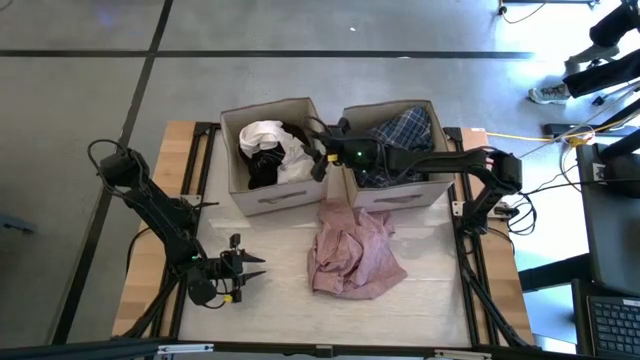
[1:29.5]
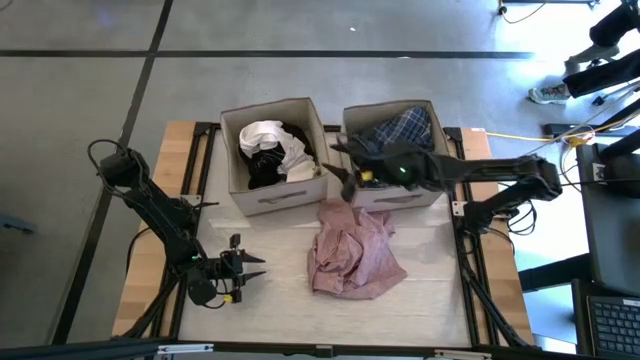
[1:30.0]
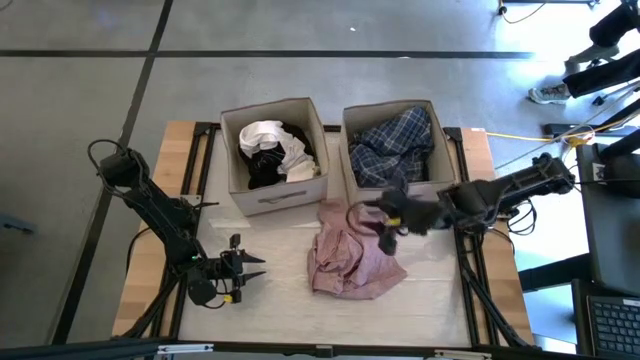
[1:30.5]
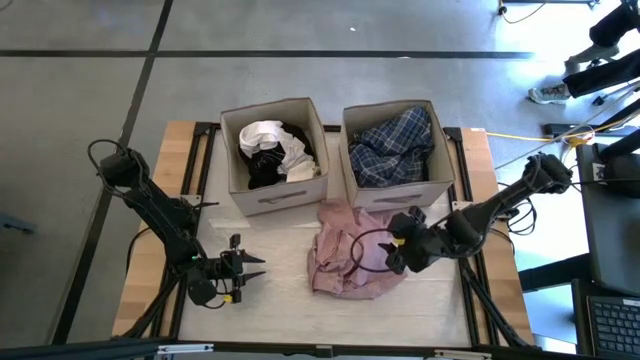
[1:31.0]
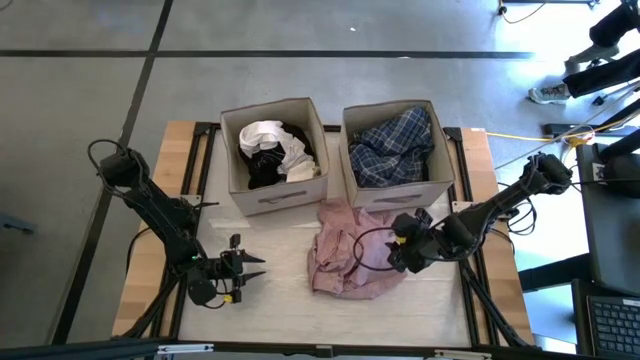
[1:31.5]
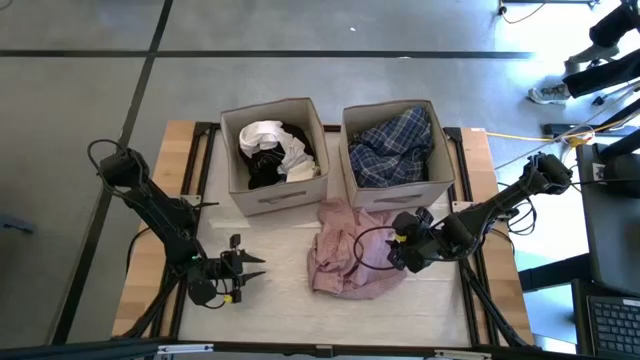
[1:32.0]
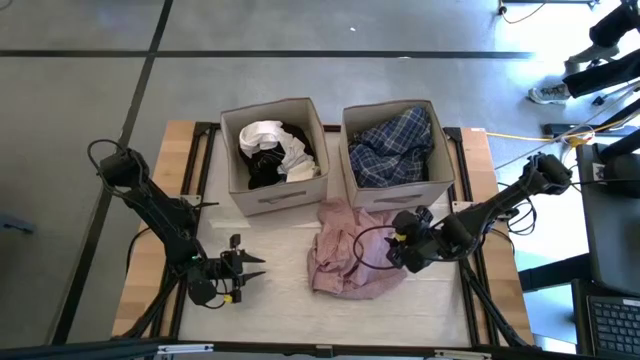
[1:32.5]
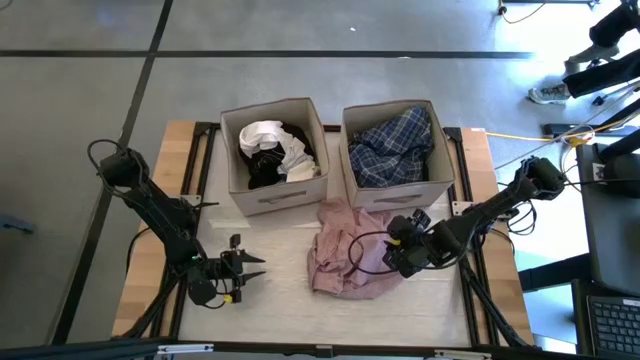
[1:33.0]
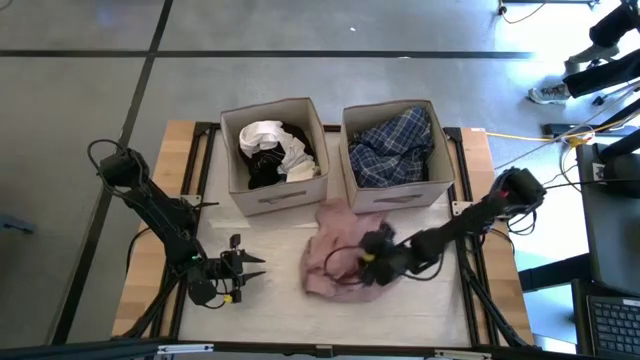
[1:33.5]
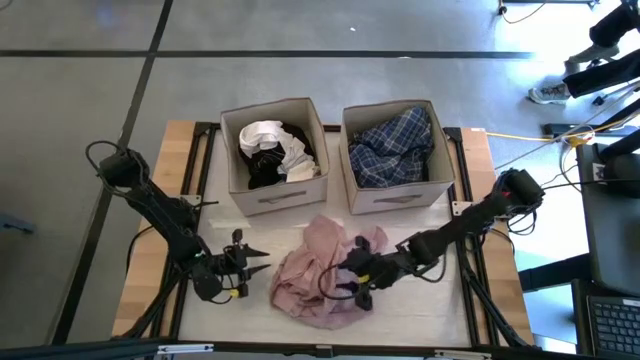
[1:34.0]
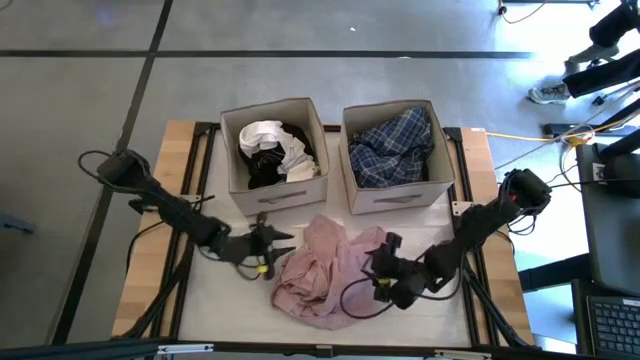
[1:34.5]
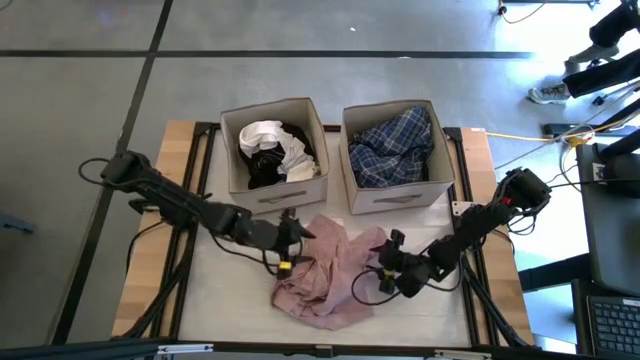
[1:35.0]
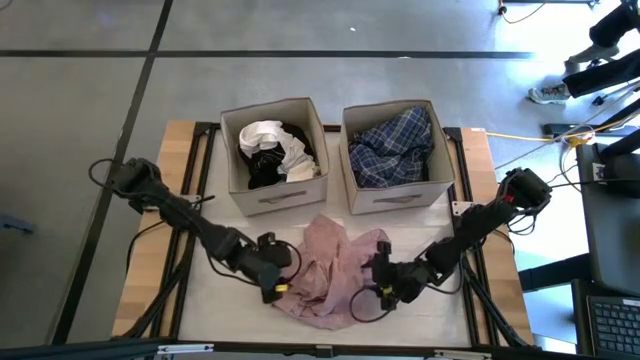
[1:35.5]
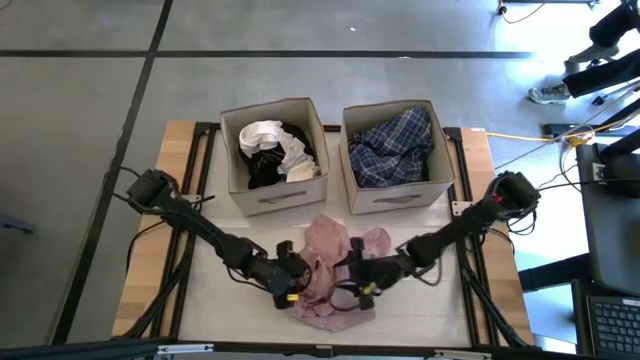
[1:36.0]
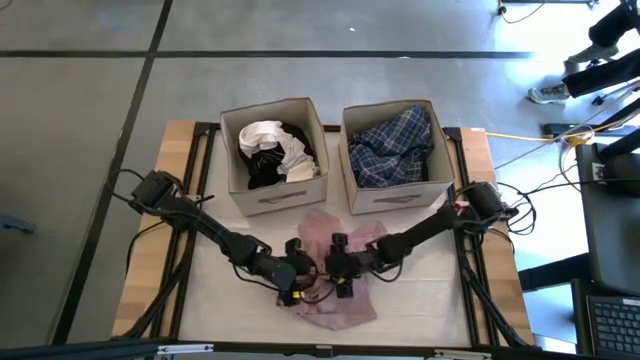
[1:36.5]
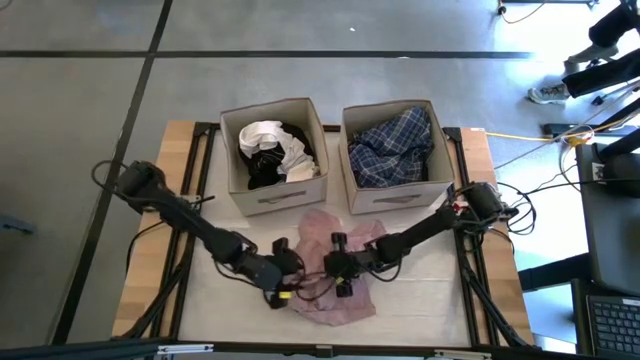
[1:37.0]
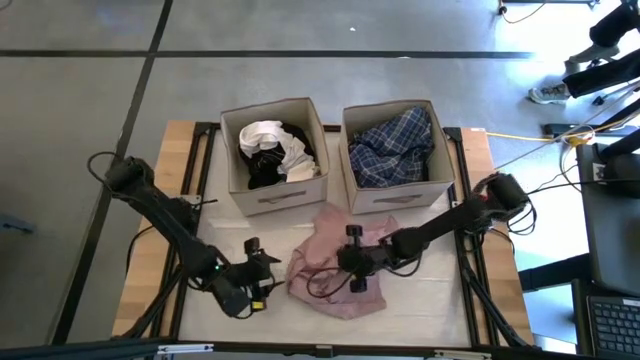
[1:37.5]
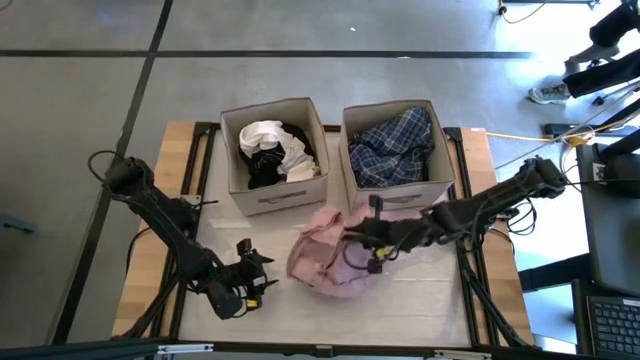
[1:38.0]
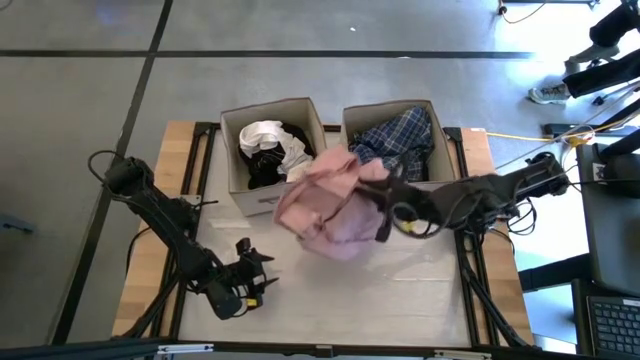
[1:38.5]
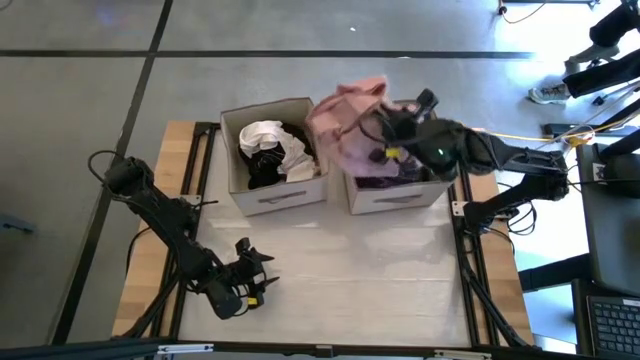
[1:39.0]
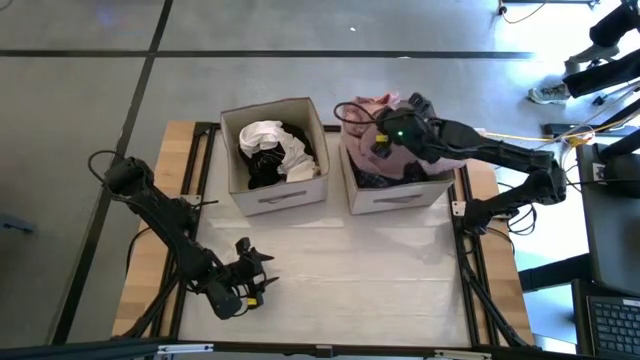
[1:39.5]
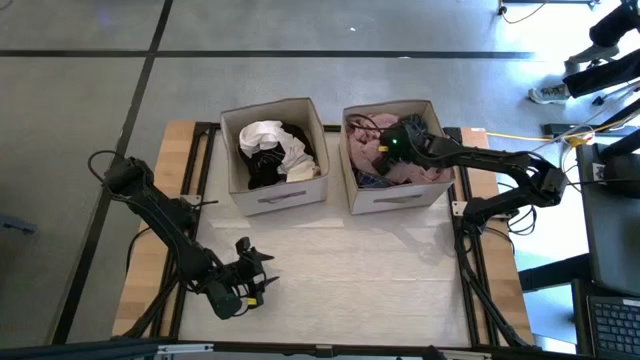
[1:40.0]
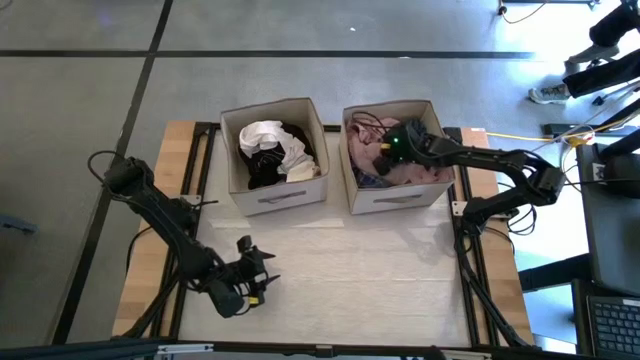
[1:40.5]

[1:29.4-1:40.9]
Task: Sort clothes
Put the pink polo shirt into the right laundry organizer

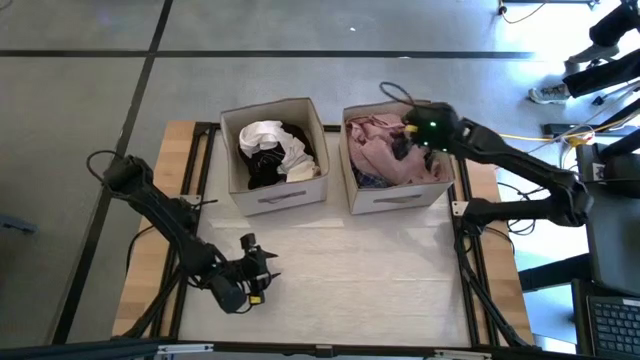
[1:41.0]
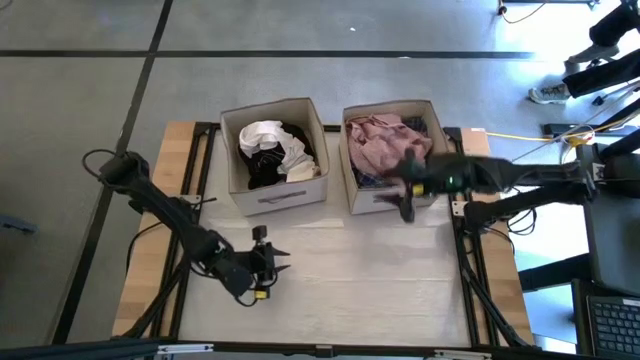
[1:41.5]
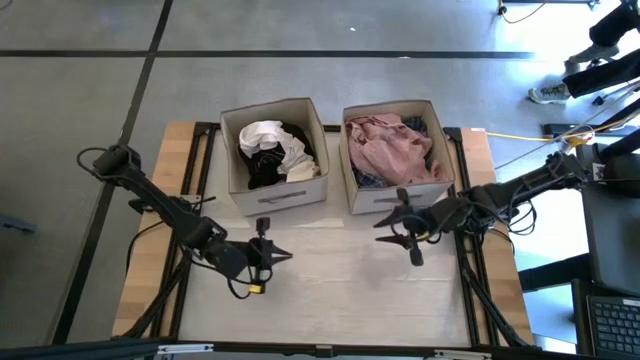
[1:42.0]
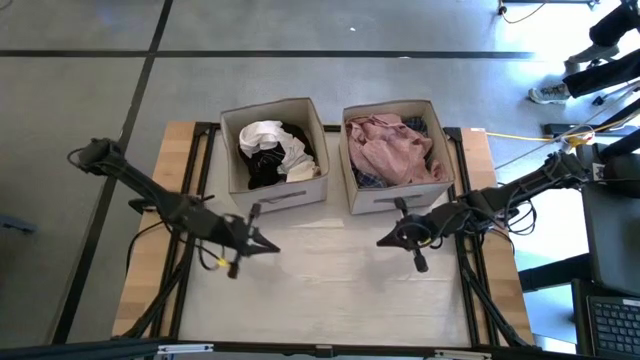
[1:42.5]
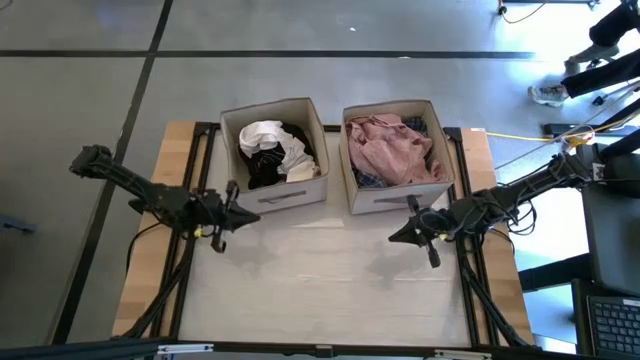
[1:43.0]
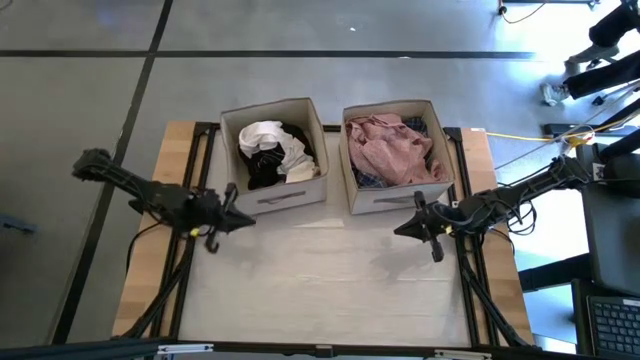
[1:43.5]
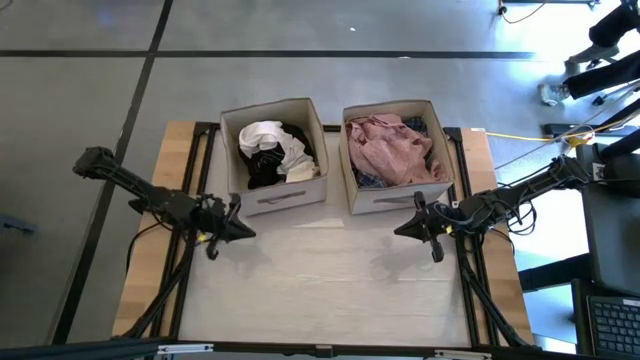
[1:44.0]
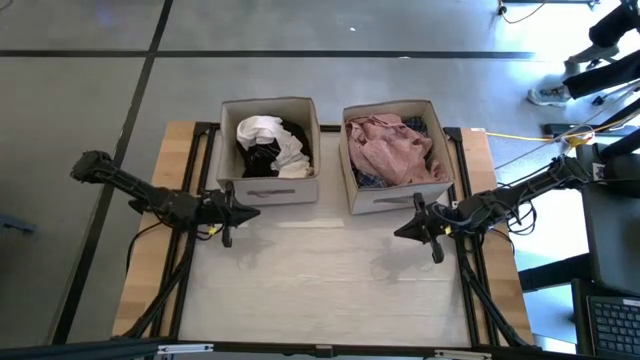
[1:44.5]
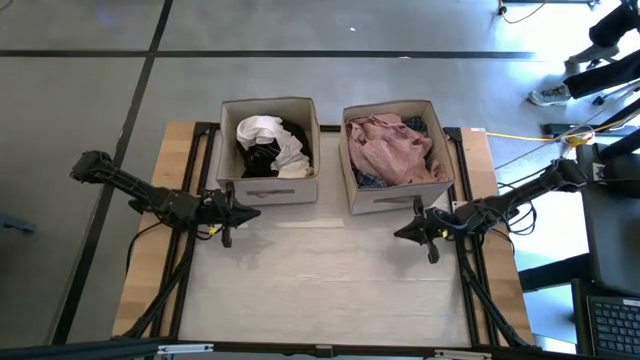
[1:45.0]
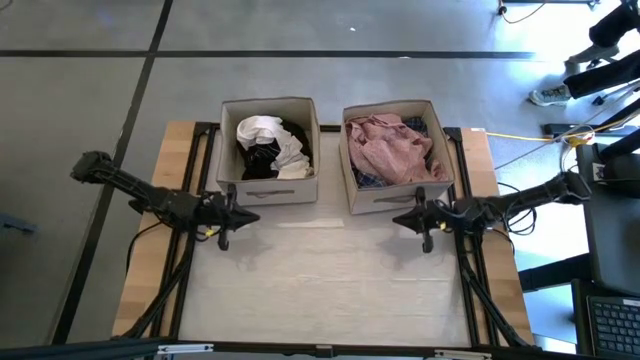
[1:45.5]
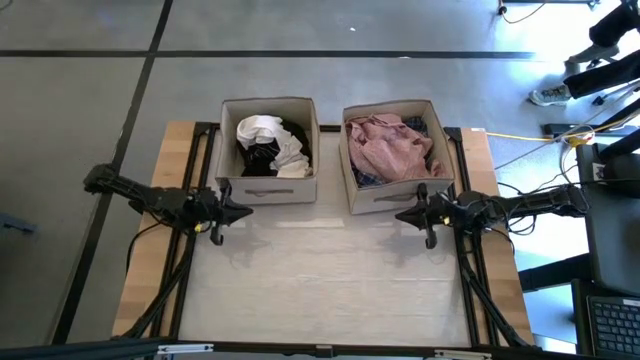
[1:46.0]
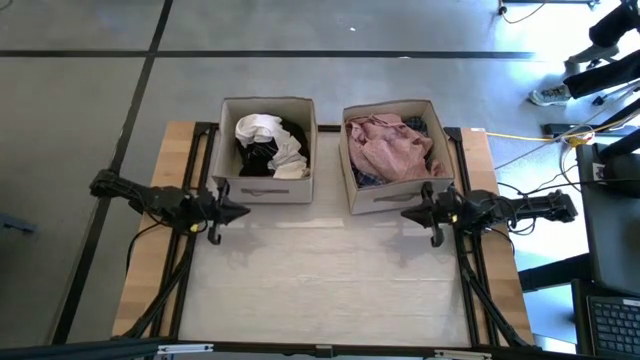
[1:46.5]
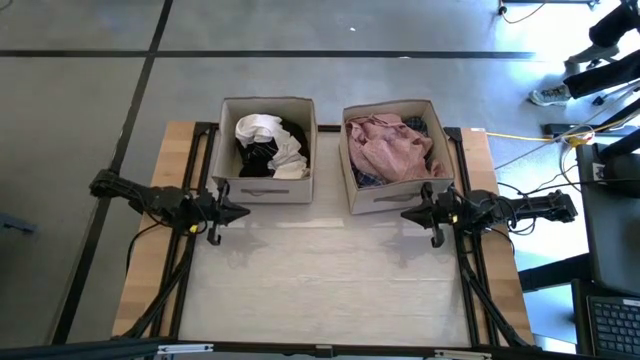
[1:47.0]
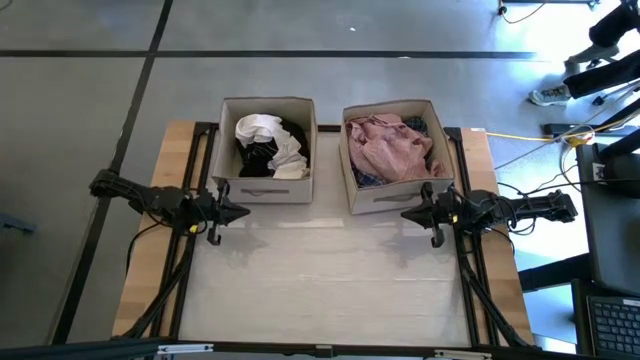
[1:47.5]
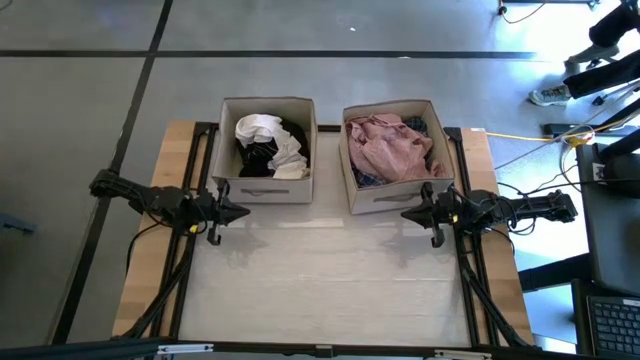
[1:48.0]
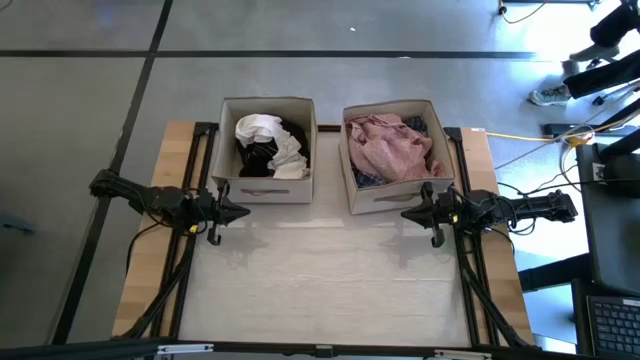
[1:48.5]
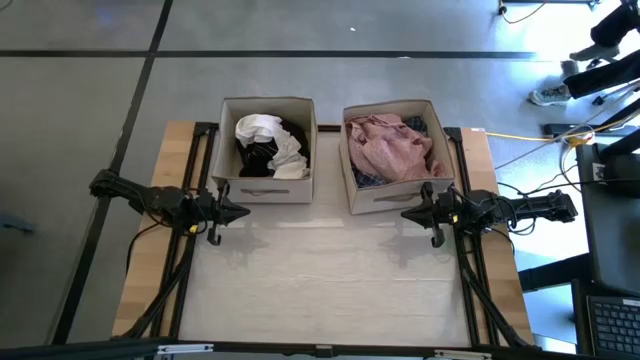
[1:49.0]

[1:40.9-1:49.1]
Return to Home Position
